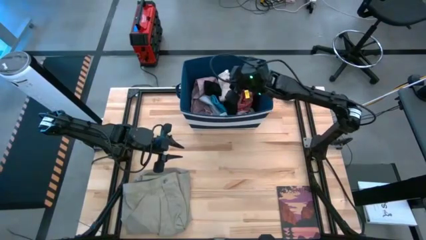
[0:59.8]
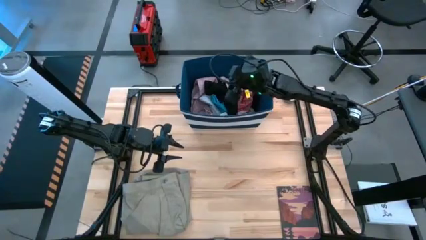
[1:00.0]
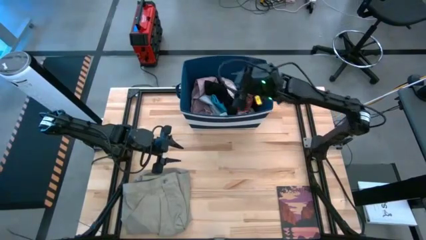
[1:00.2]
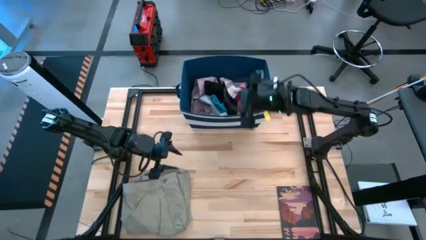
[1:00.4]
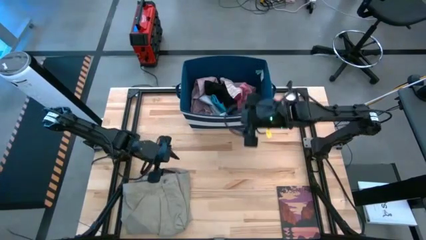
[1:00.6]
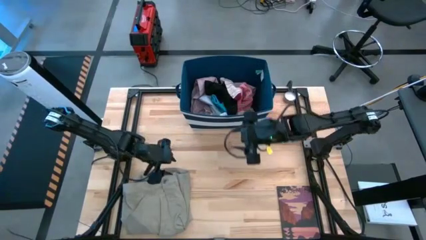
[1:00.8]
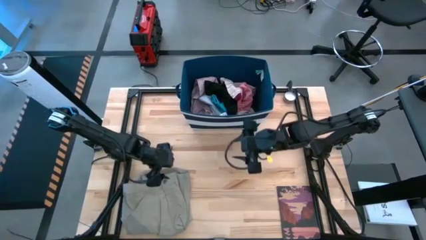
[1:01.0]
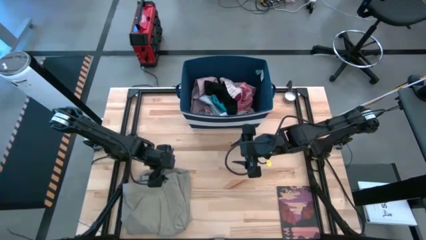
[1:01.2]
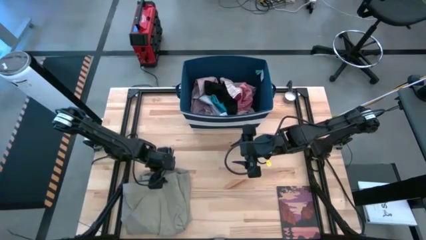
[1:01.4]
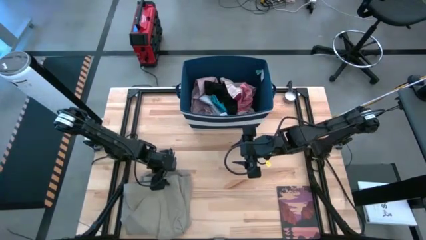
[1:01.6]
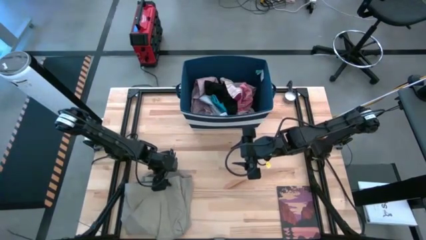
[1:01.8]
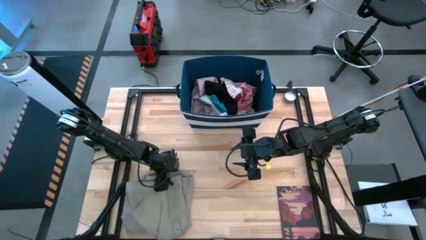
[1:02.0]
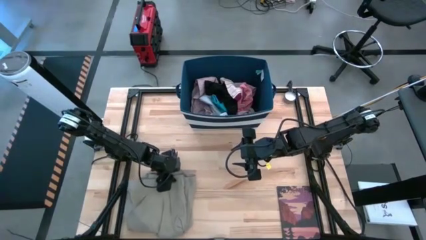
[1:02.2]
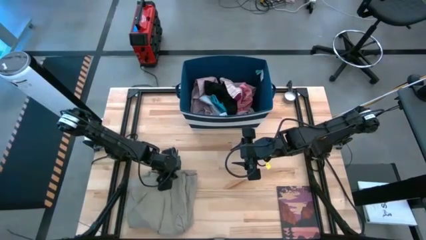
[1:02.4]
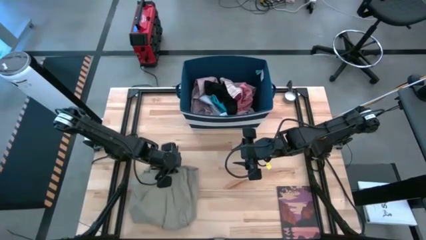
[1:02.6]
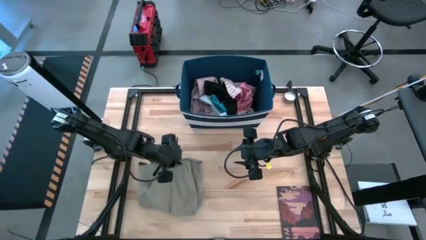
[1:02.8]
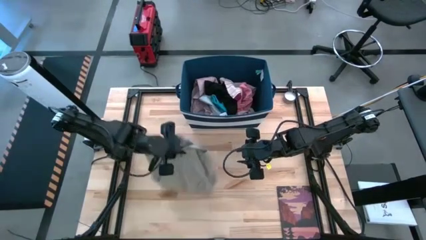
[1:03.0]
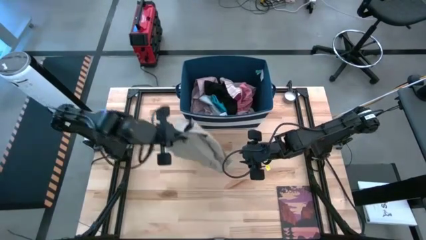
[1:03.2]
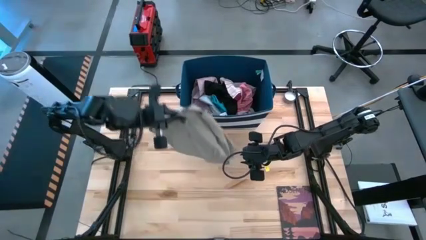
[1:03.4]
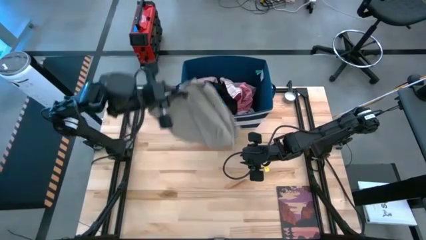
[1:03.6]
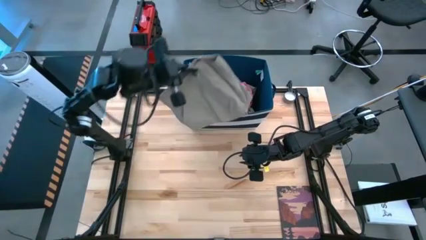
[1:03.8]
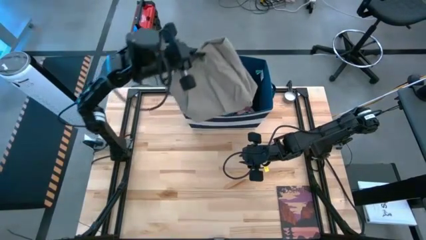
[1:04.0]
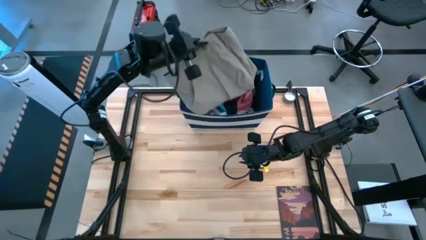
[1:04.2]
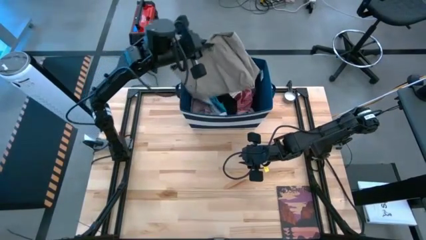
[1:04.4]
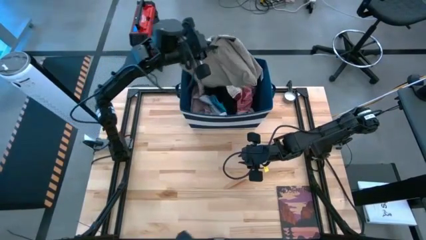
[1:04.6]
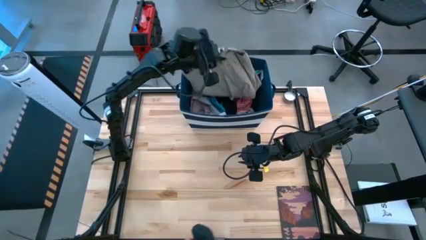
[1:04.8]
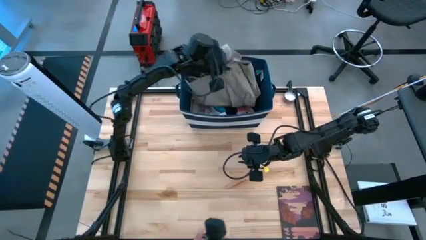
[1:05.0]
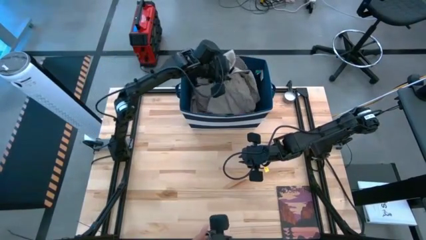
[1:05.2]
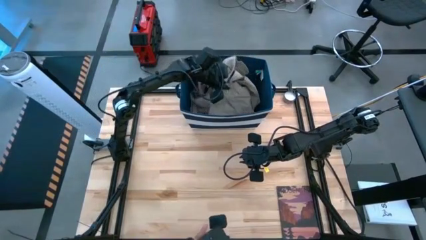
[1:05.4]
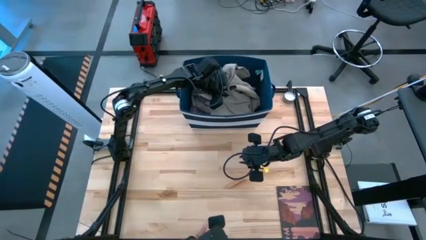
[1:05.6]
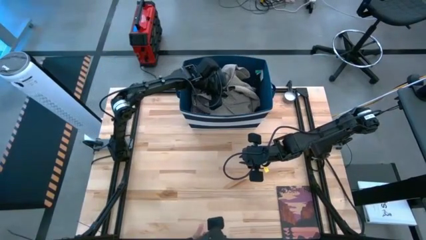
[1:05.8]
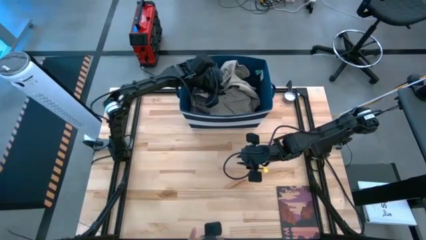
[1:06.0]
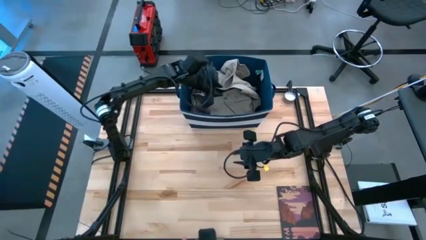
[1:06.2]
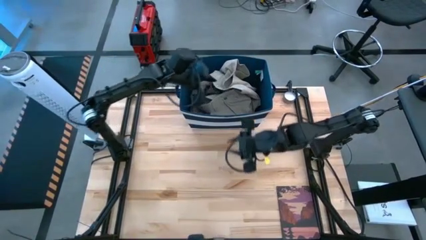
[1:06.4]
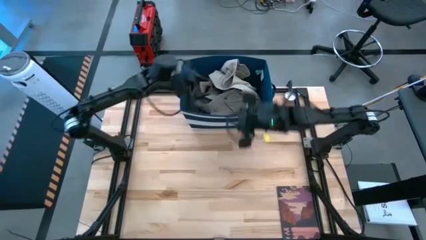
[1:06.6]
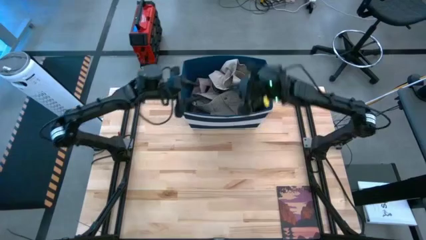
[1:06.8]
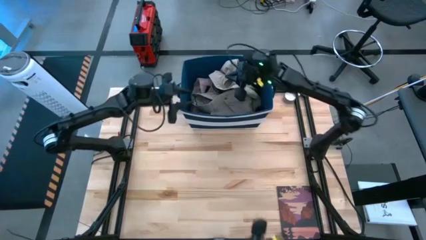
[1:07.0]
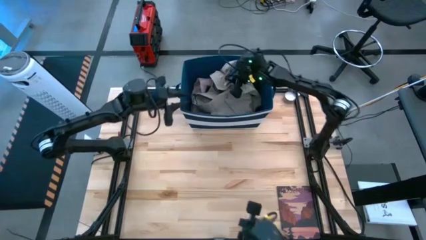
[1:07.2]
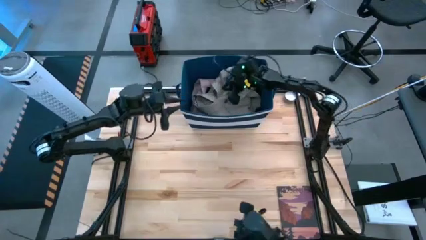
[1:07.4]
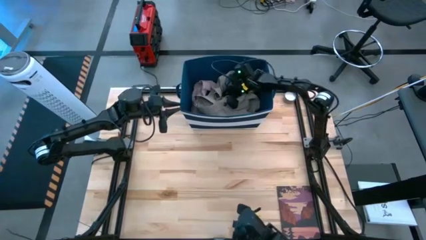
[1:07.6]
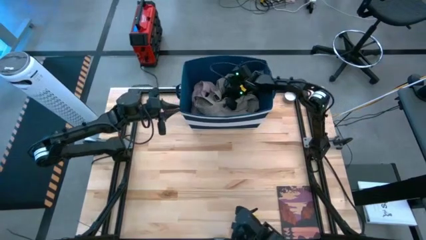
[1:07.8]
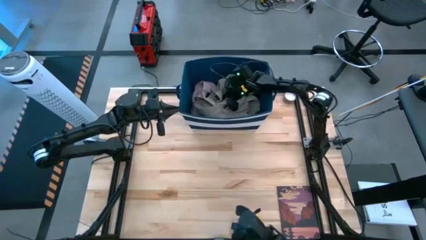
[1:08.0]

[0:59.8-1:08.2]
Task: Sort clothes
Put the gray short into the blue laundry bin

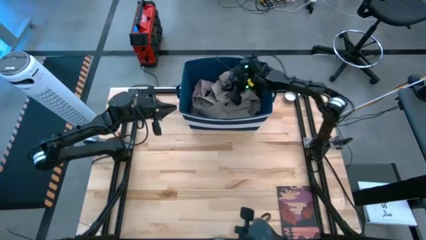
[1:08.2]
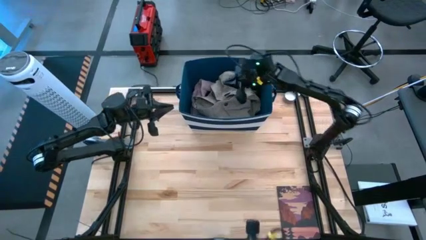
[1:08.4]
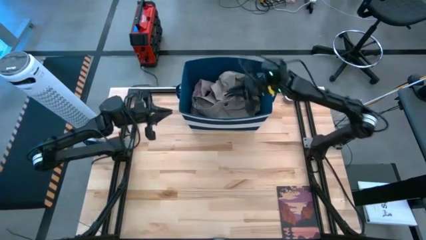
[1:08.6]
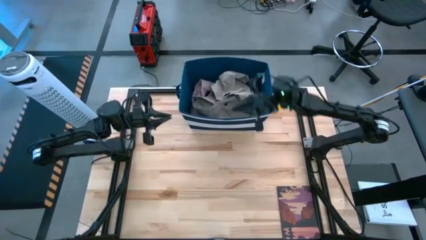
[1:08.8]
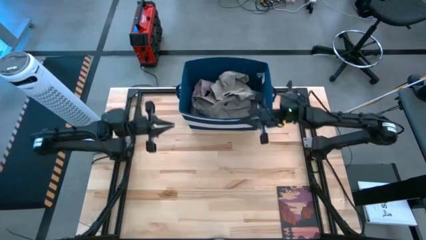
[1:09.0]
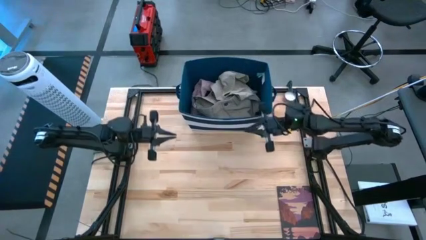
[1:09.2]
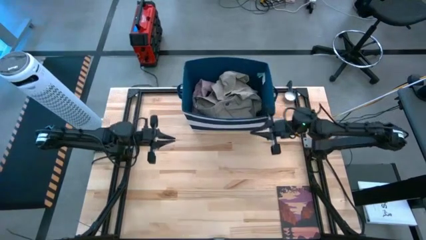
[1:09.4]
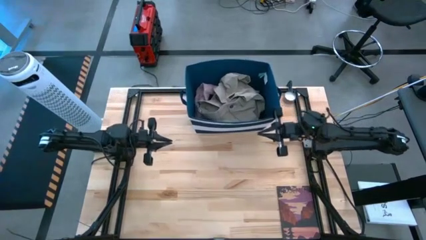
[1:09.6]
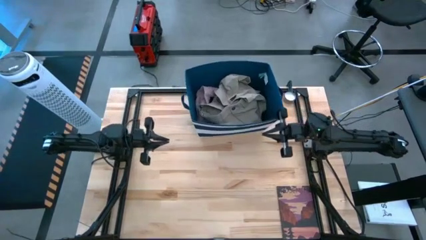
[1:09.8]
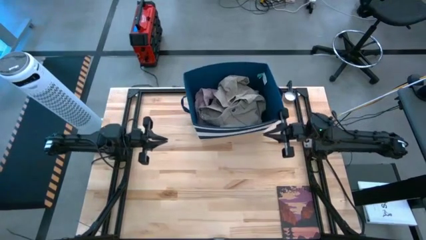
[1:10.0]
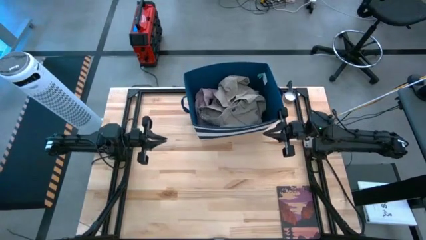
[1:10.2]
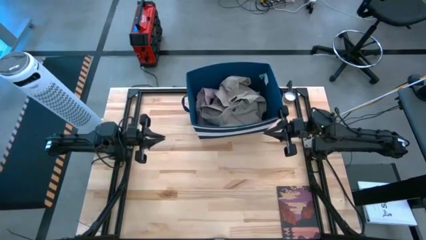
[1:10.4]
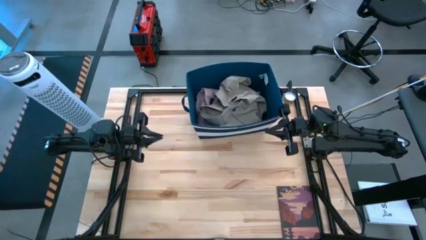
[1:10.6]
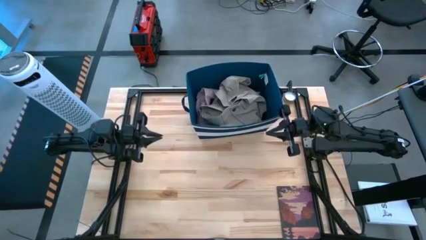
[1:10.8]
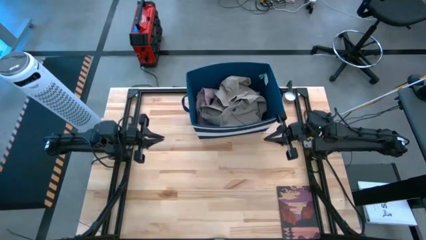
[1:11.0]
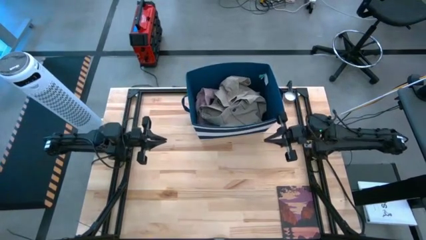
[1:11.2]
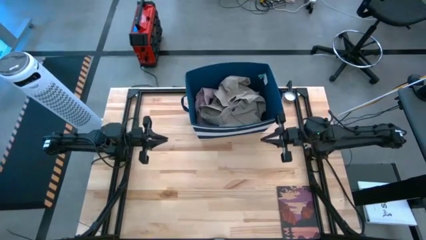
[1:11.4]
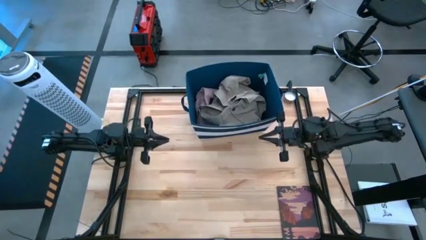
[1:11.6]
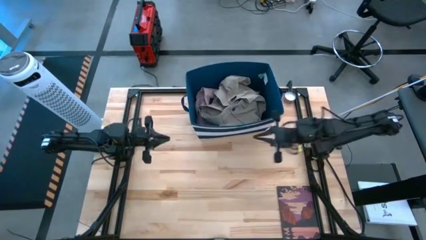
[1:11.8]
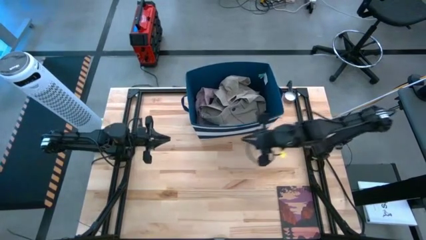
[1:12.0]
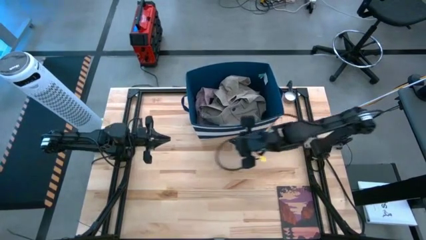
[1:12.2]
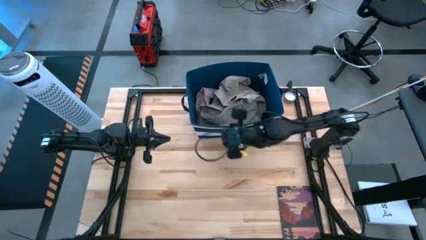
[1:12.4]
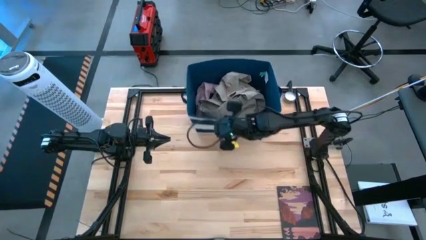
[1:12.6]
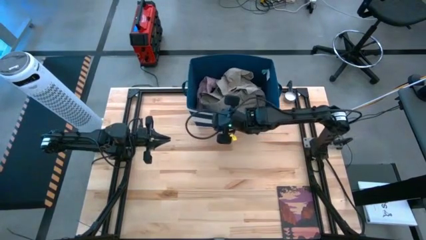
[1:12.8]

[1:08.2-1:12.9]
Adjust the blue laundry bin

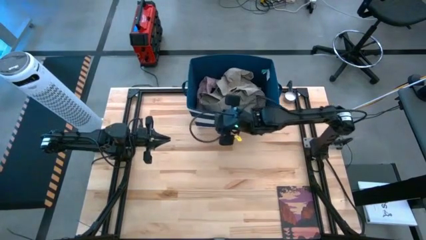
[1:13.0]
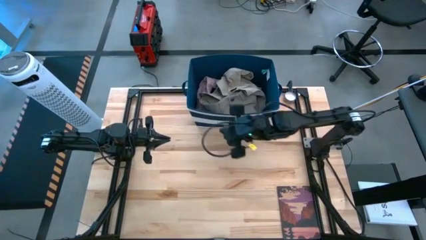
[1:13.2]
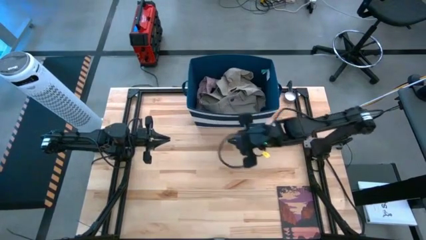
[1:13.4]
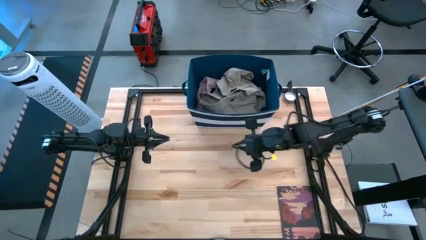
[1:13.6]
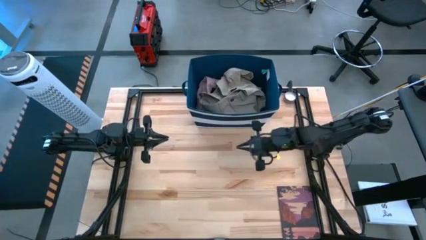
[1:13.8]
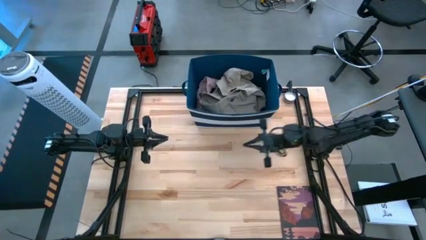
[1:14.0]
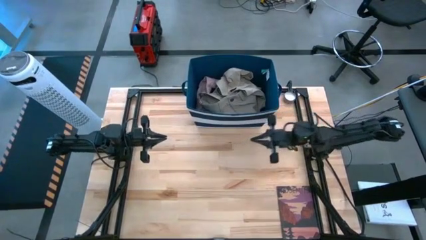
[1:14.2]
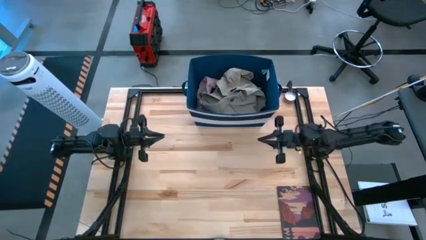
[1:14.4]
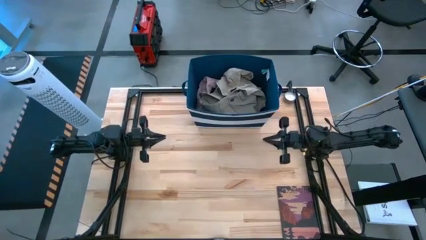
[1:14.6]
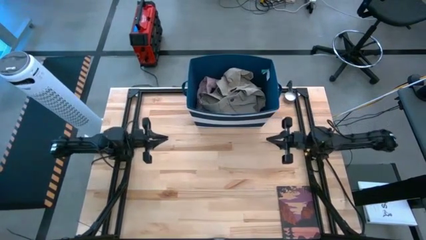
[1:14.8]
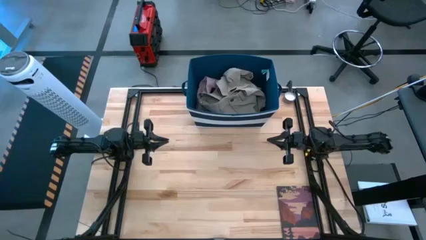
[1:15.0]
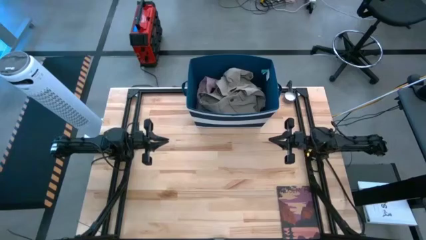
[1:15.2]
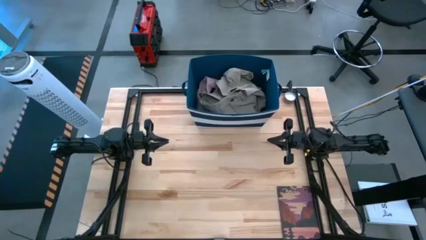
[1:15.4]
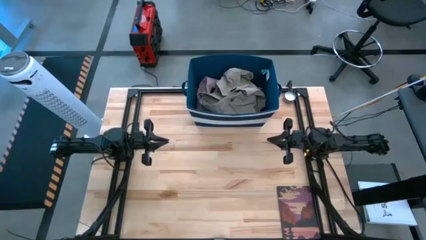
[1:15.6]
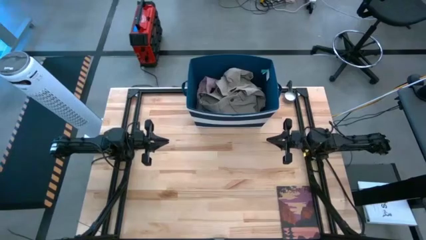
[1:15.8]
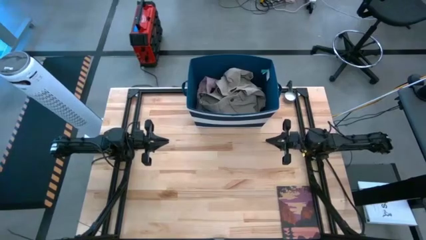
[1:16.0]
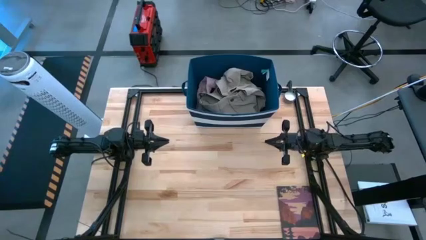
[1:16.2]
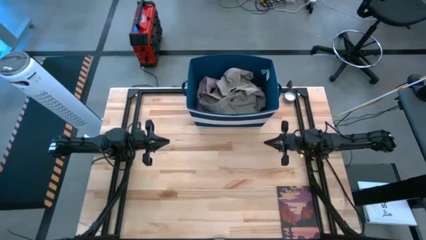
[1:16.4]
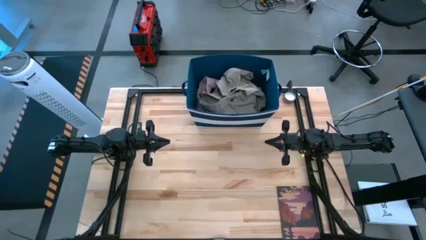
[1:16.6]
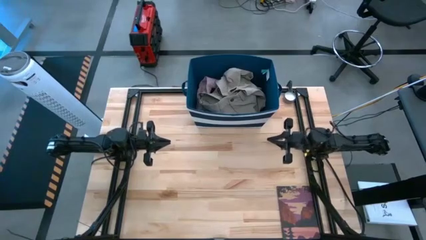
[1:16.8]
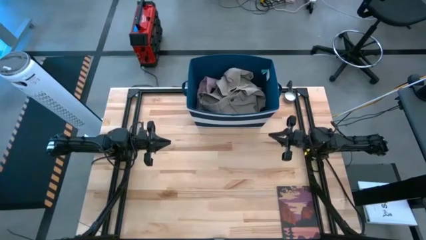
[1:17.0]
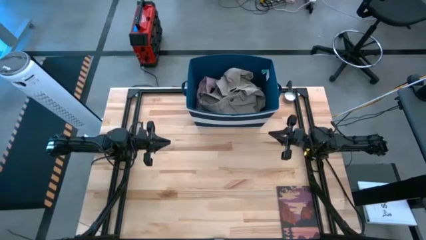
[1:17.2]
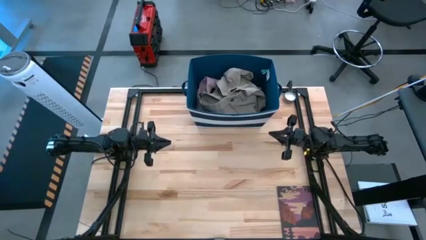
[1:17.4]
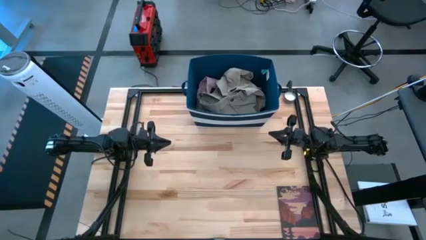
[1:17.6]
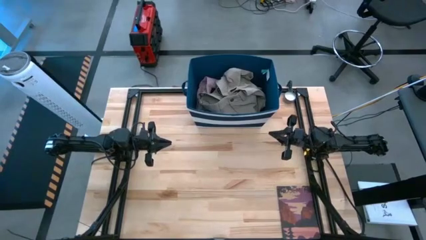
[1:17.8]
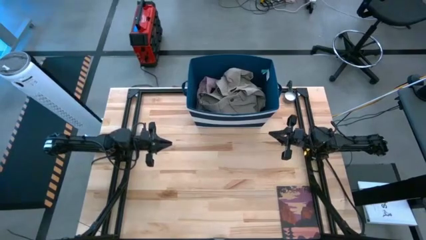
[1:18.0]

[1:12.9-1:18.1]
Return to Home Position
